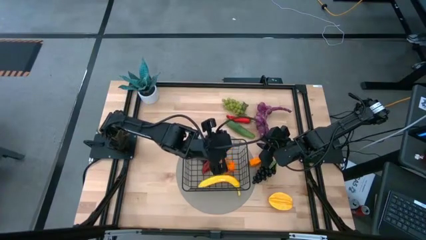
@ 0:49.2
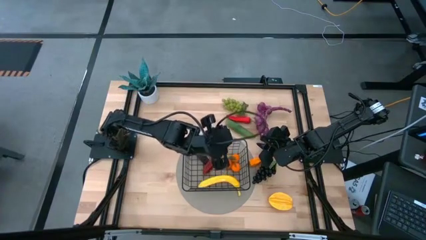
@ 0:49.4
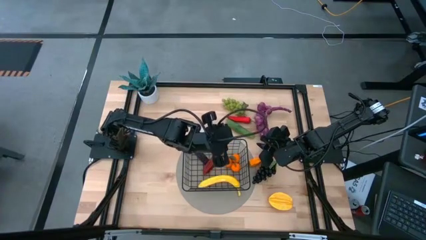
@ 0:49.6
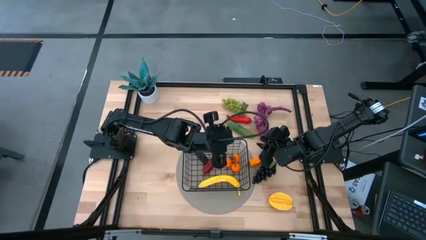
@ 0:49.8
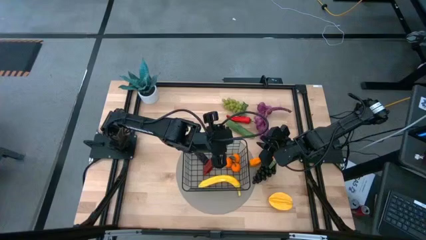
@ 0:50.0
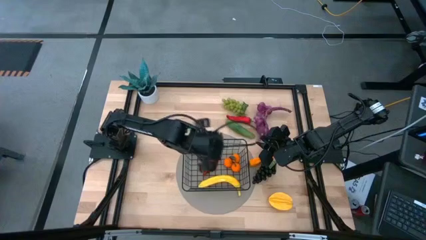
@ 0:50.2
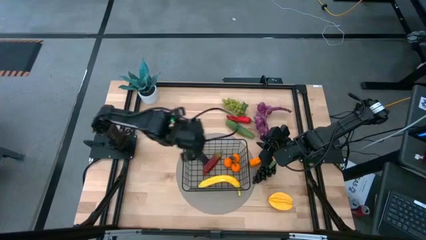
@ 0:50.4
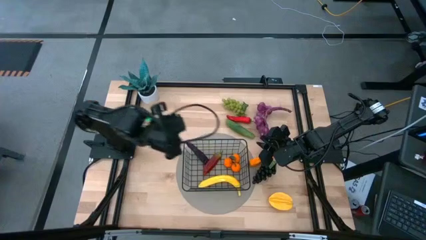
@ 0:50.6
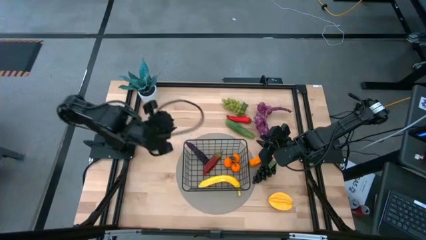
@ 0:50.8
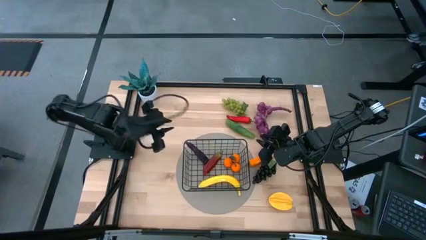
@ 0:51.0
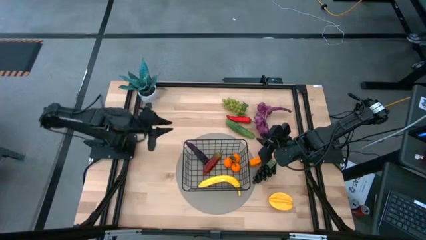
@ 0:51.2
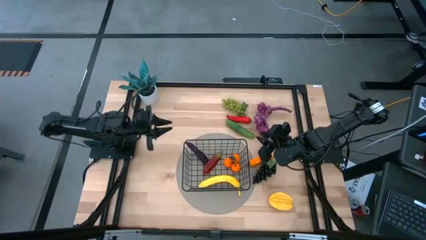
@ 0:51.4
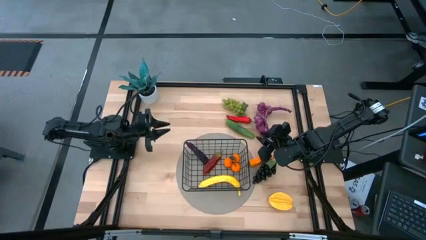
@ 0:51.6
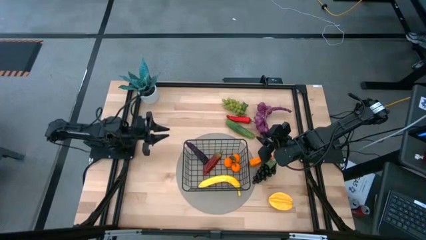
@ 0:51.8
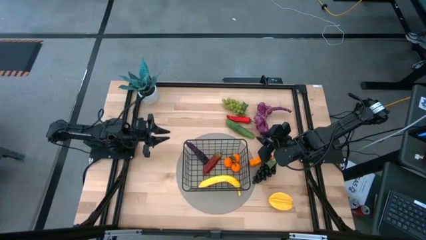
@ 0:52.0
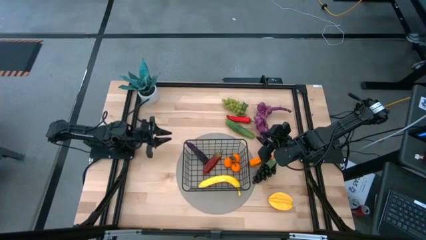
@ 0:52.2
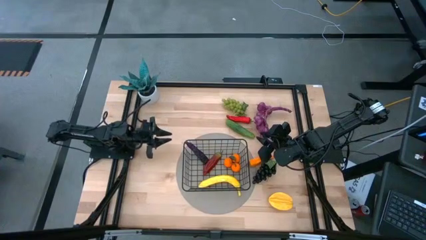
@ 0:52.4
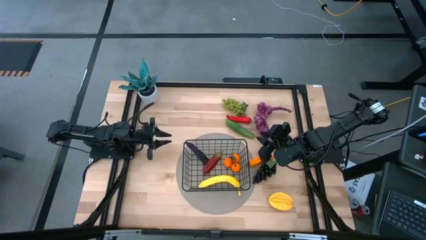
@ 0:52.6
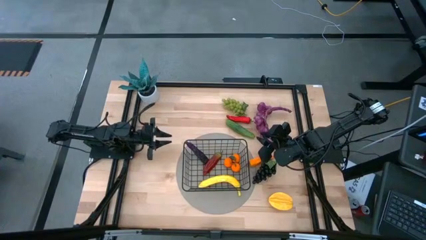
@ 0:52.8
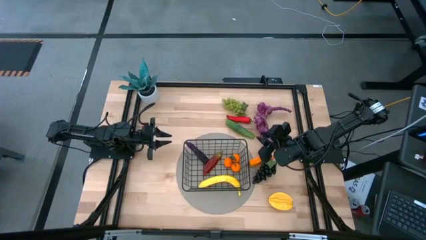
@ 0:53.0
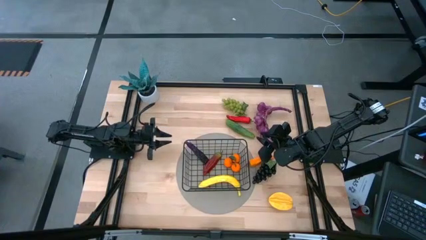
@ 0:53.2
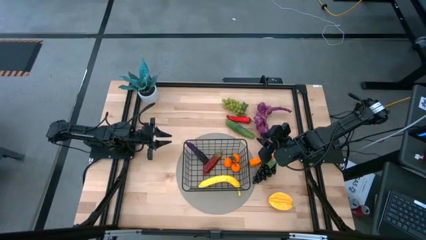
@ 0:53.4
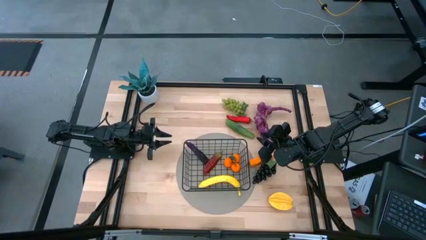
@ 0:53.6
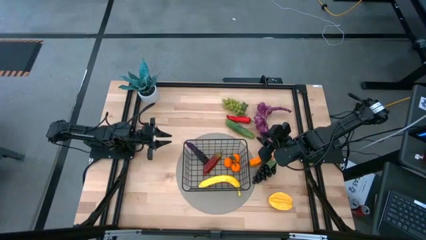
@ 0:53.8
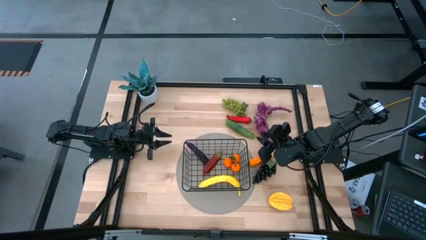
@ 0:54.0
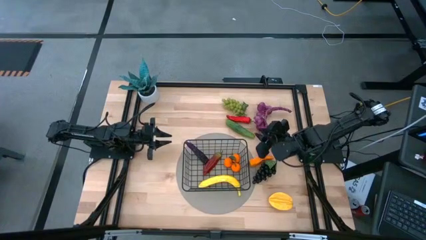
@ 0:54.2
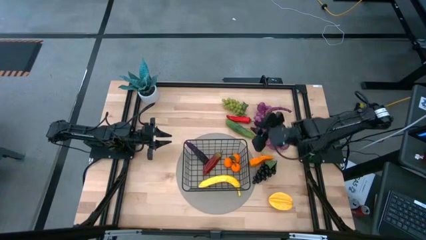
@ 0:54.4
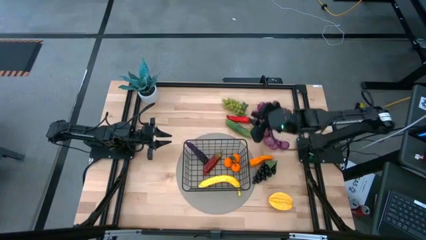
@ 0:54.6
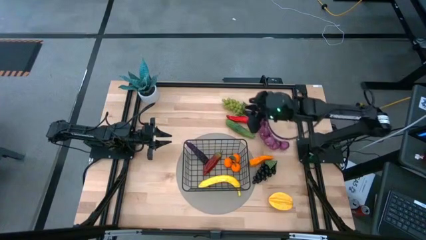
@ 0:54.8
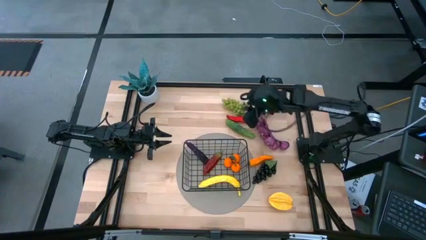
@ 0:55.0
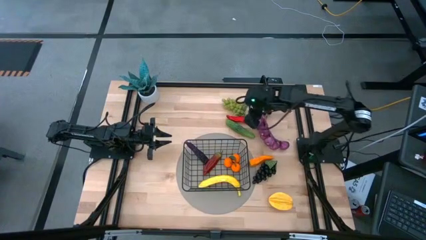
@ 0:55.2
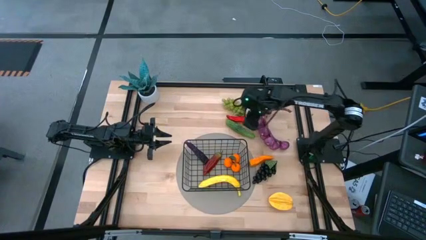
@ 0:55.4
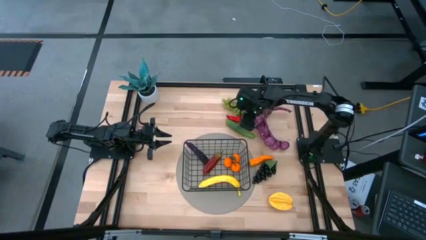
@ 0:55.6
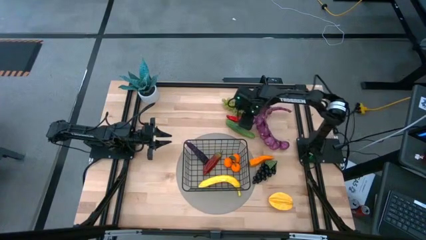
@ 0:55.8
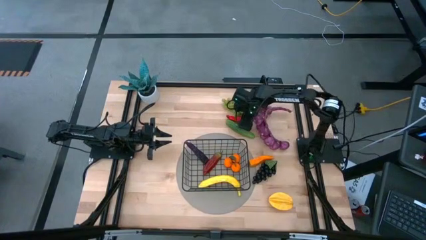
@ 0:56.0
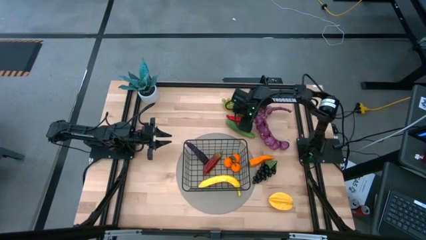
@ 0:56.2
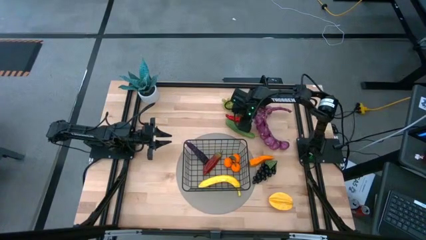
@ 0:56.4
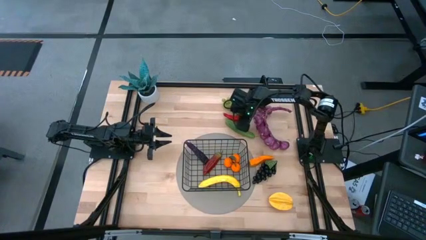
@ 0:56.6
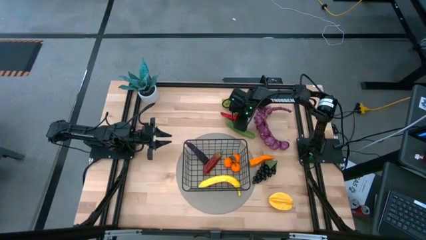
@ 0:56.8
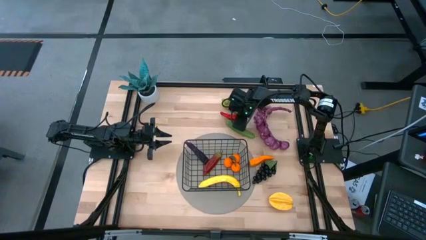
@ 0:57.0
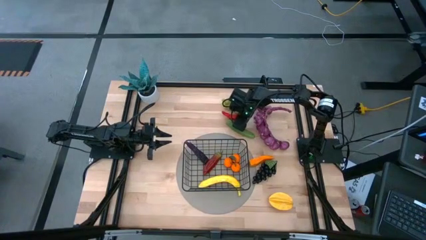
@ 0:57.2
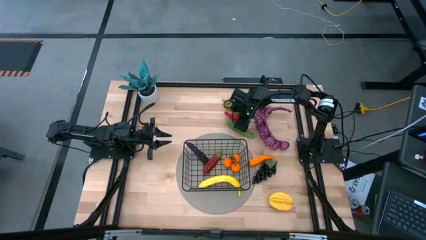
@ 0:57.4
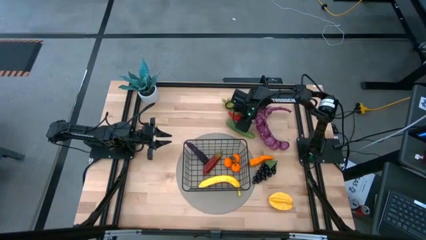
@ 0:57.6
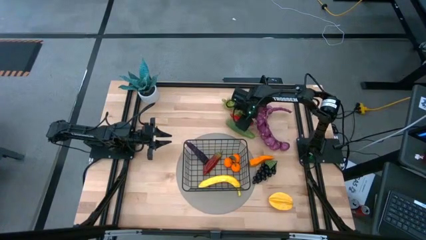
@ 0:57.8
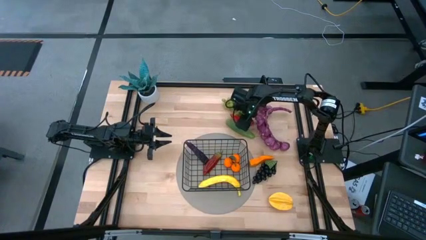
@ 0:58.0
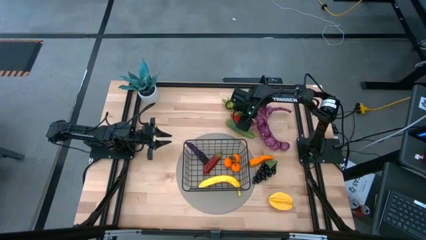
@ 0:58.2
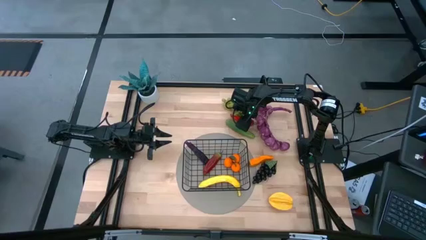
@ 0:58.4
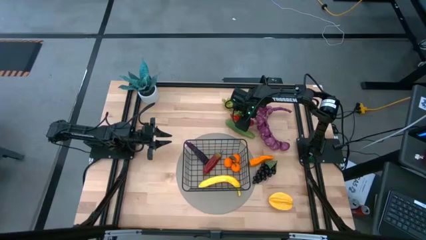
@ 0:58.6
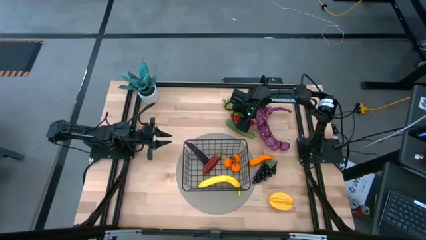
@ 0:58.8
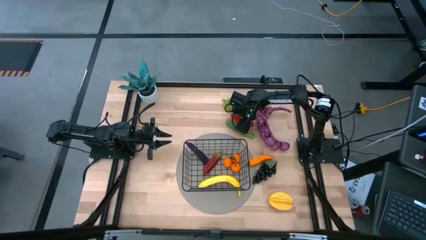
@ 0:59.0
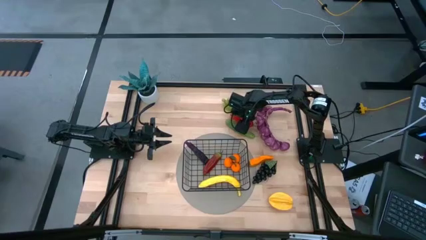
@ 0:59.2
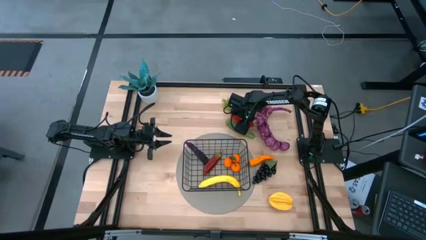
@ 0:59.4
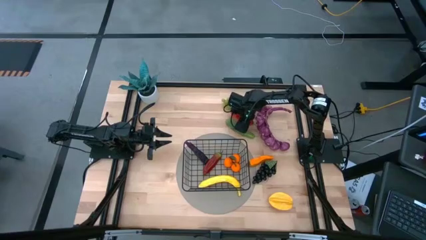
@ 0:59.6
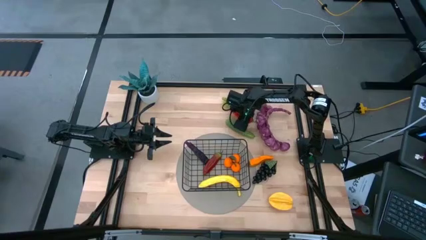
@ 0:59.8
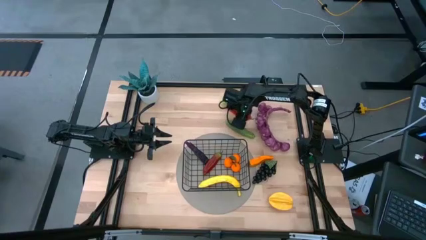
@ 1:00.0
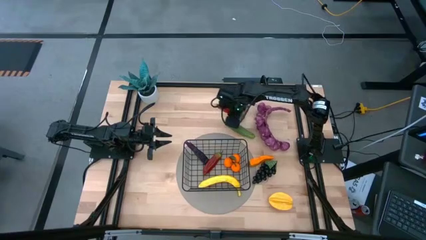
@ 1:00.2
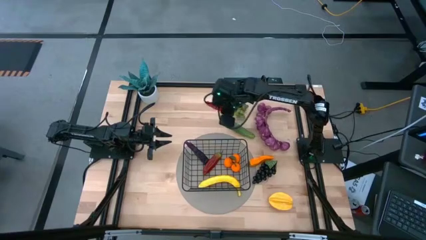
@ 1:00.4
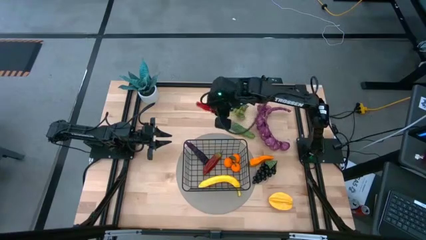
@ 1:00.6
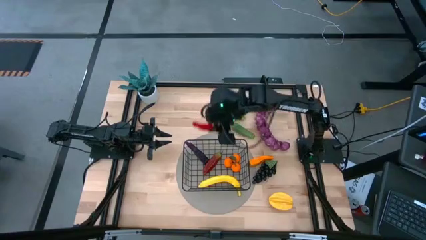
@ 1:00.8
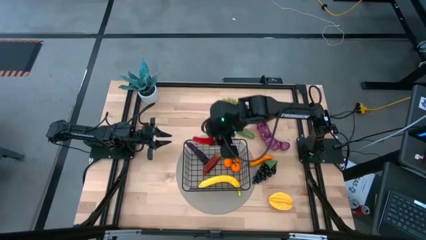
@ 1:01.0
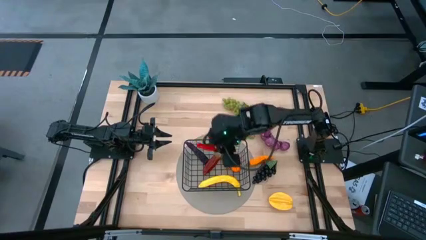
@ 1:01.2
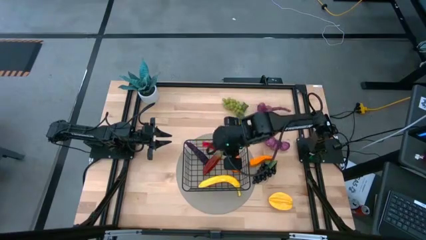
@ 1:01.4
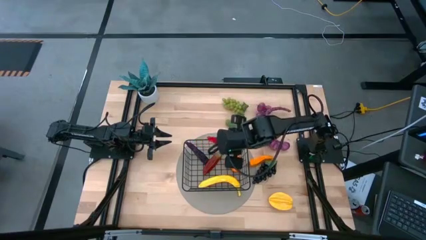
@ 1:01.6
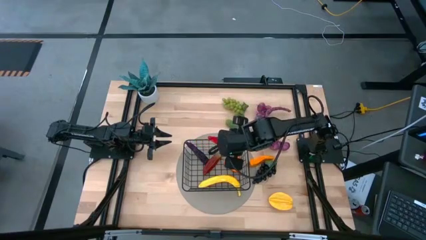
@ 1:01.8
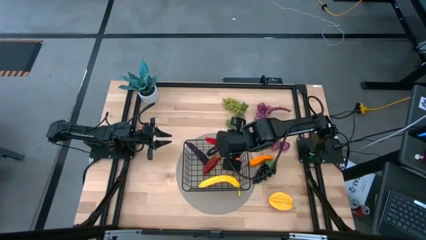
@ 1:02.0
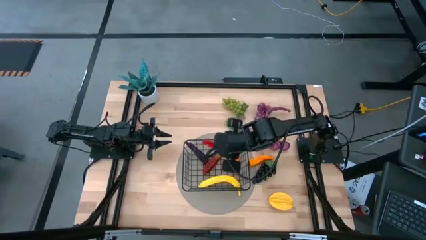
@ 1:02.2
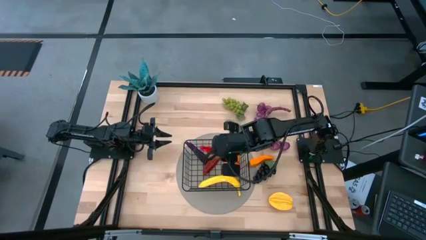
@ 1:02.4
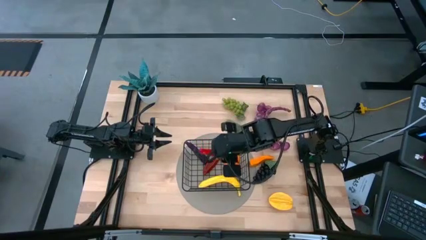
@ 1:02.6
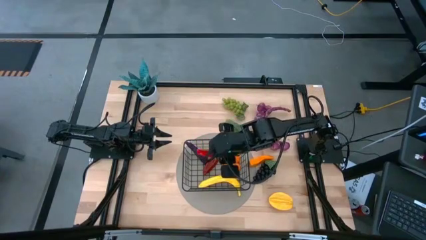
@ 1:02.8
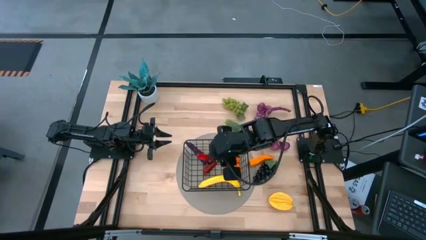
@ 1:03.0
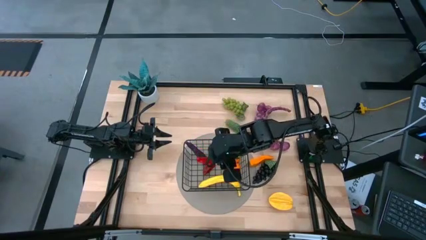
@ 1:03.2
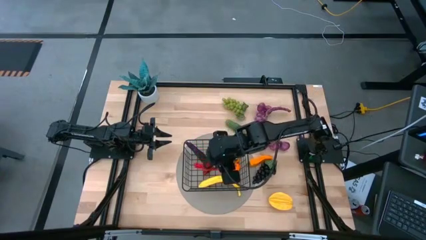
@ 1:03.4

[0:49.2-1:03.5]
Task: Build produce basket
Put the red chili pepper into the black wire basket
